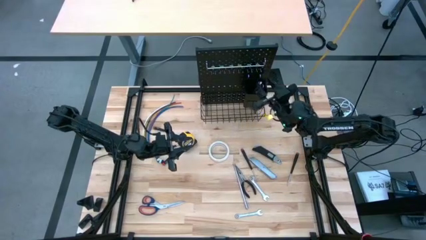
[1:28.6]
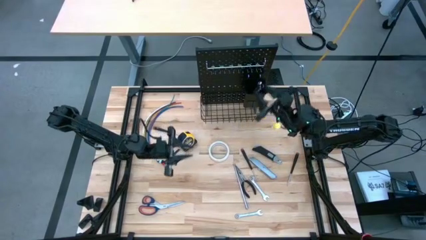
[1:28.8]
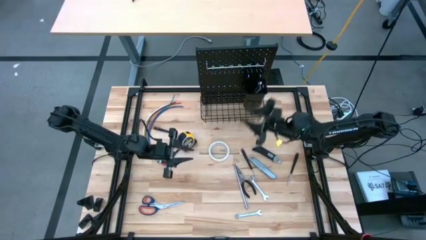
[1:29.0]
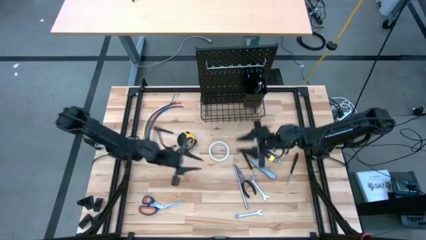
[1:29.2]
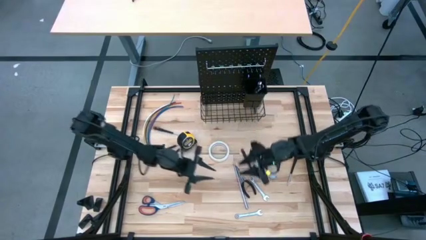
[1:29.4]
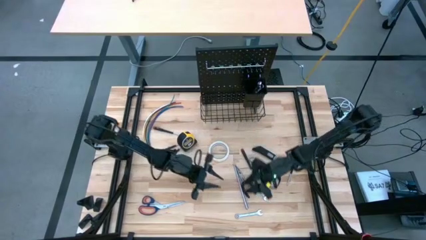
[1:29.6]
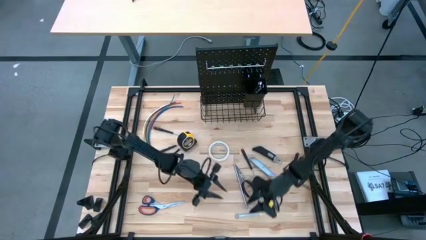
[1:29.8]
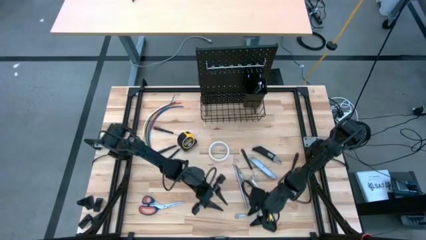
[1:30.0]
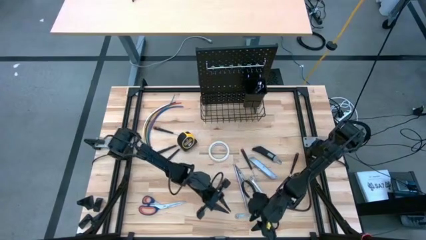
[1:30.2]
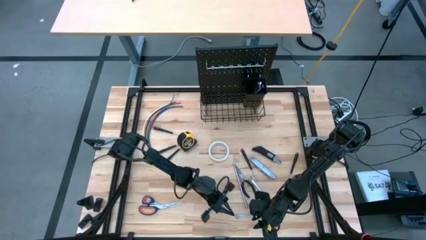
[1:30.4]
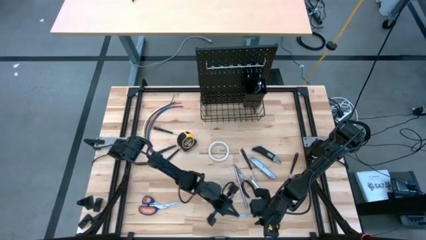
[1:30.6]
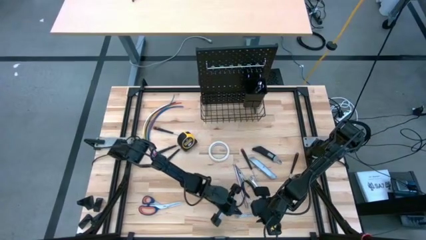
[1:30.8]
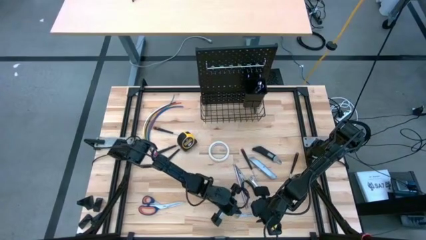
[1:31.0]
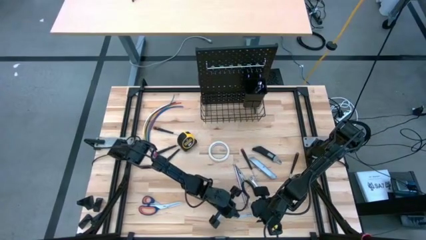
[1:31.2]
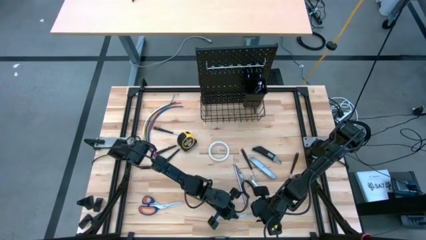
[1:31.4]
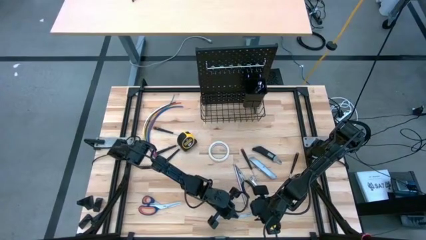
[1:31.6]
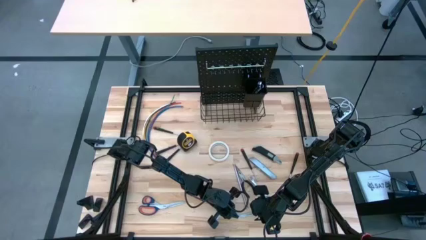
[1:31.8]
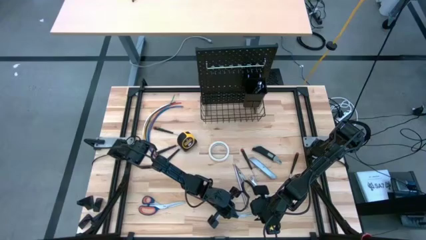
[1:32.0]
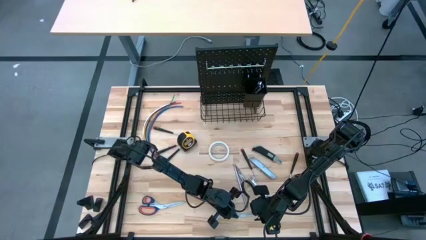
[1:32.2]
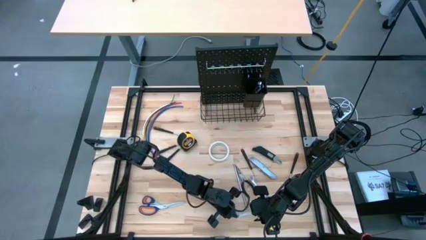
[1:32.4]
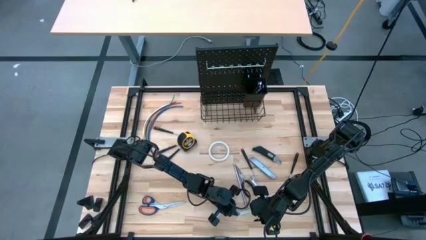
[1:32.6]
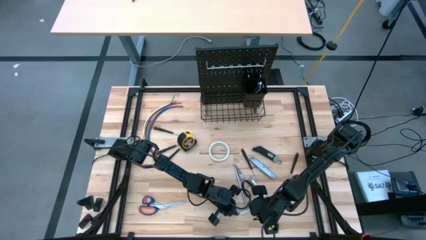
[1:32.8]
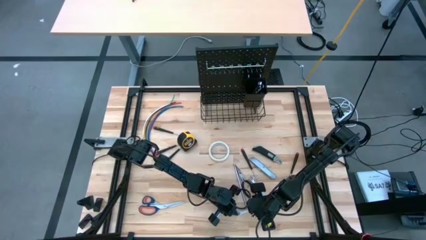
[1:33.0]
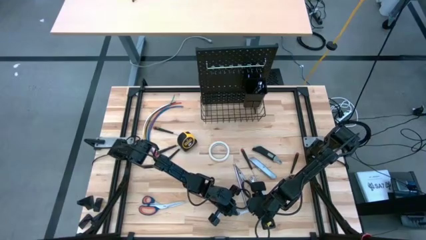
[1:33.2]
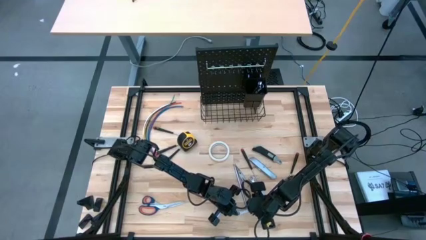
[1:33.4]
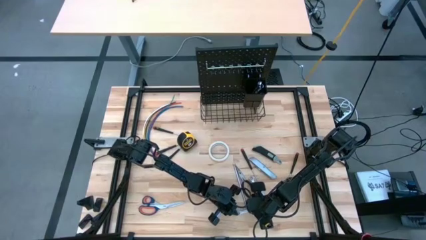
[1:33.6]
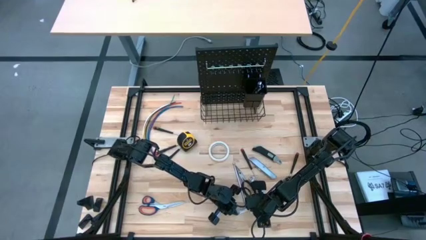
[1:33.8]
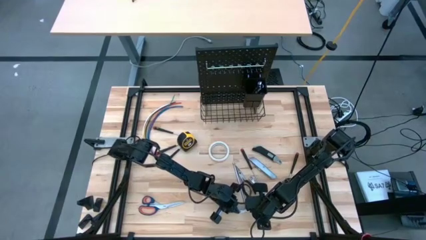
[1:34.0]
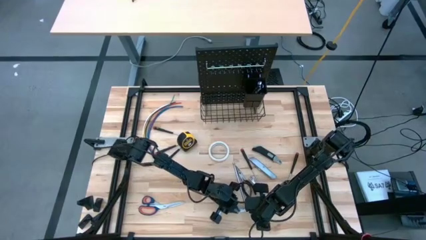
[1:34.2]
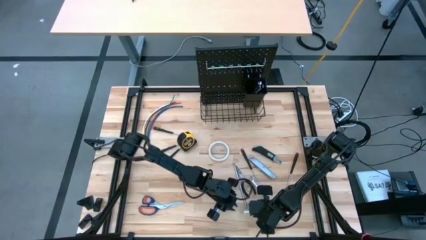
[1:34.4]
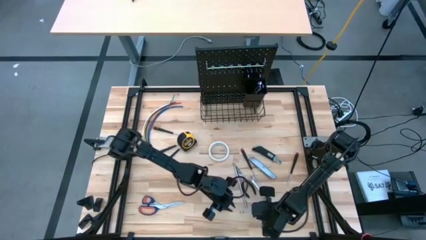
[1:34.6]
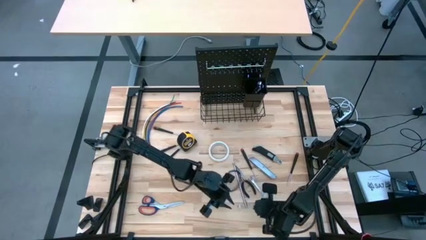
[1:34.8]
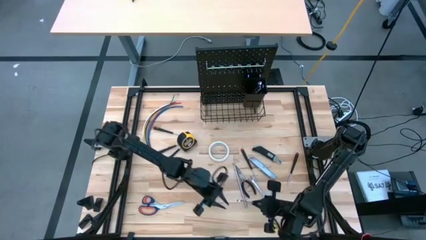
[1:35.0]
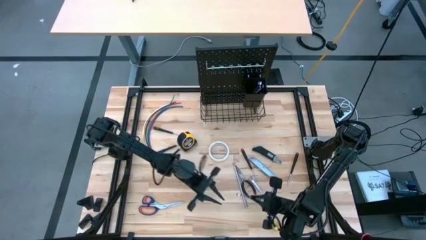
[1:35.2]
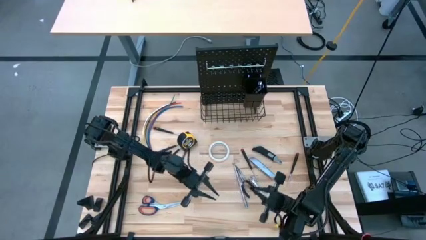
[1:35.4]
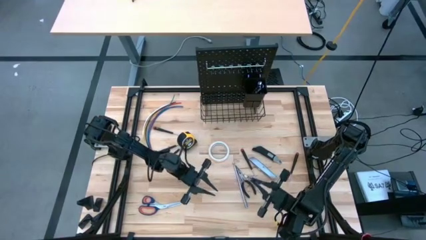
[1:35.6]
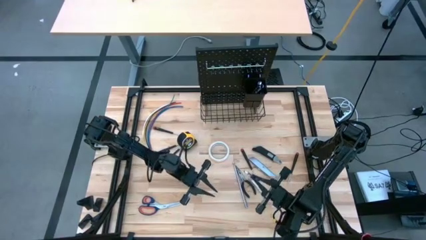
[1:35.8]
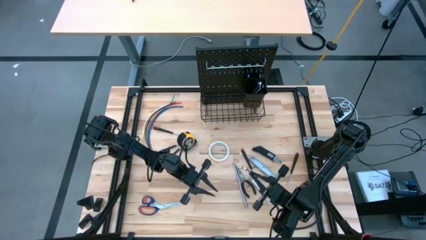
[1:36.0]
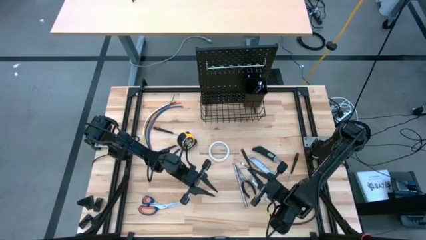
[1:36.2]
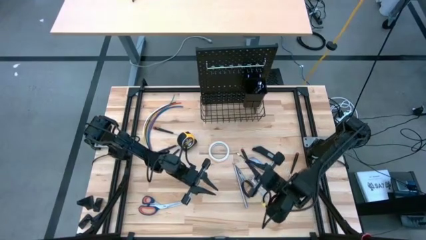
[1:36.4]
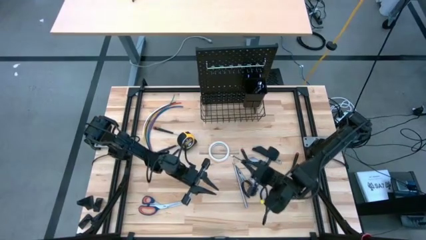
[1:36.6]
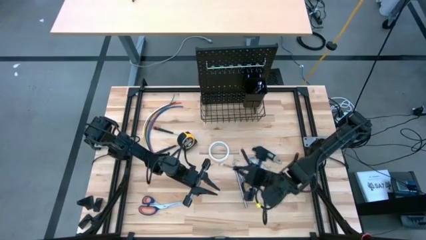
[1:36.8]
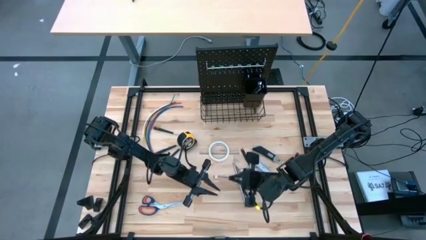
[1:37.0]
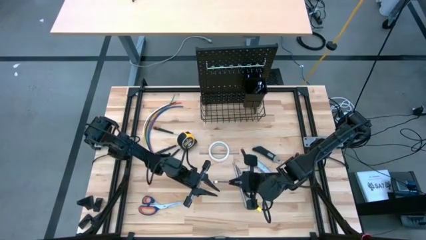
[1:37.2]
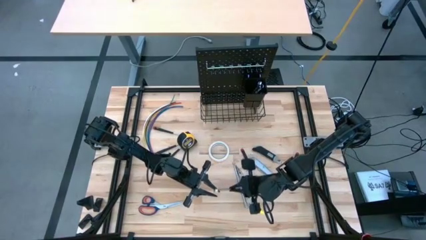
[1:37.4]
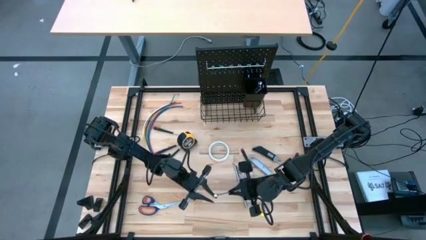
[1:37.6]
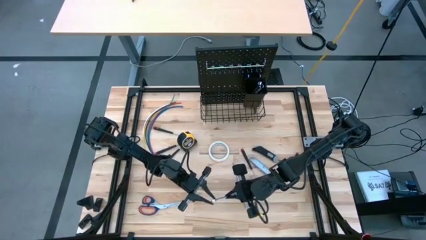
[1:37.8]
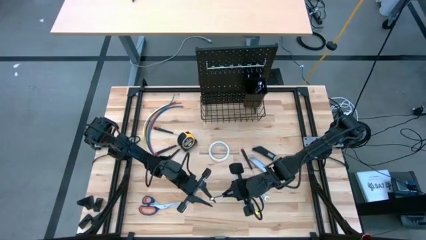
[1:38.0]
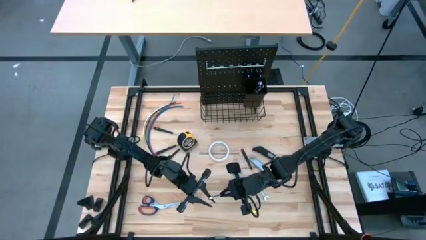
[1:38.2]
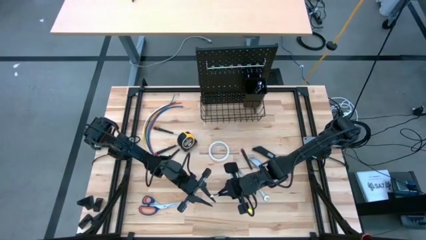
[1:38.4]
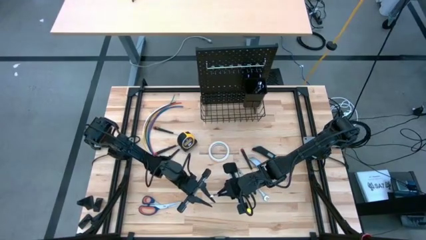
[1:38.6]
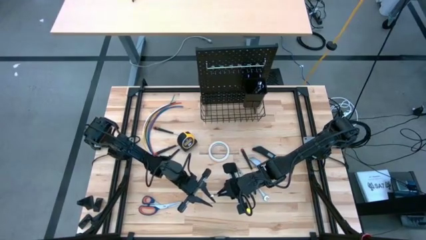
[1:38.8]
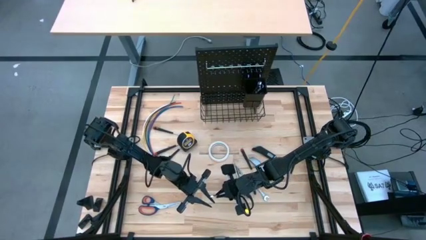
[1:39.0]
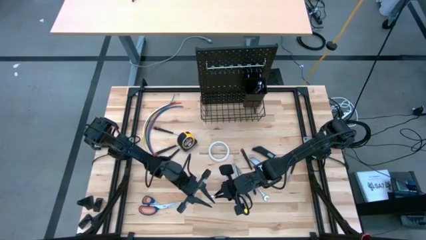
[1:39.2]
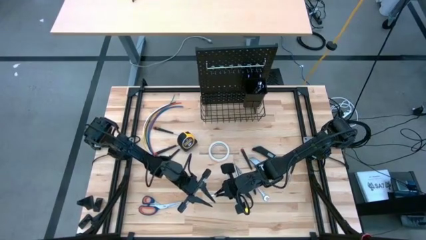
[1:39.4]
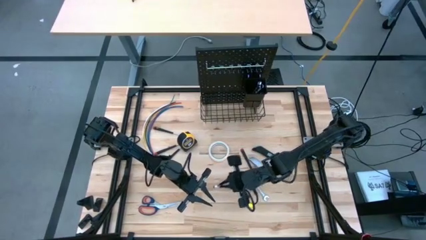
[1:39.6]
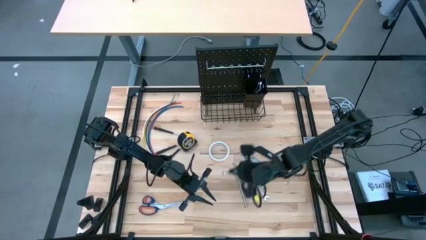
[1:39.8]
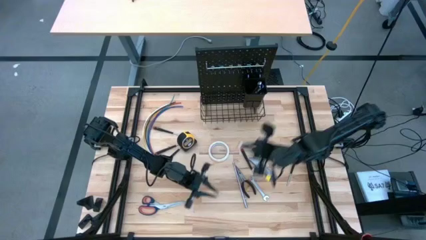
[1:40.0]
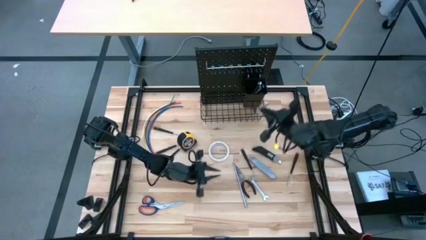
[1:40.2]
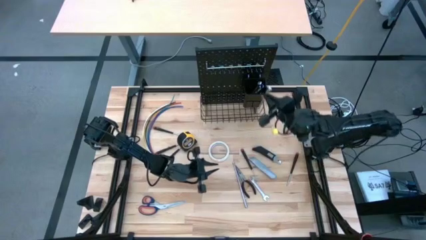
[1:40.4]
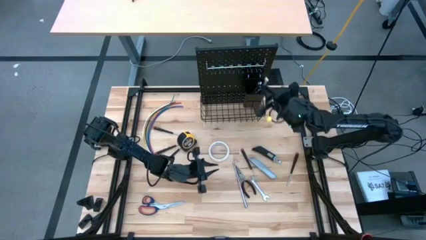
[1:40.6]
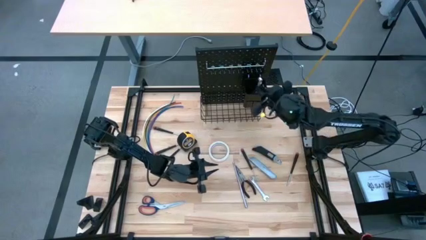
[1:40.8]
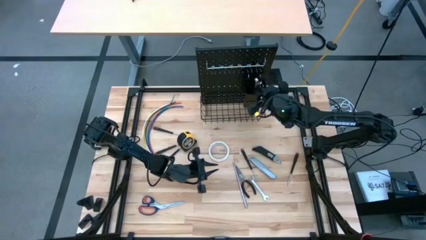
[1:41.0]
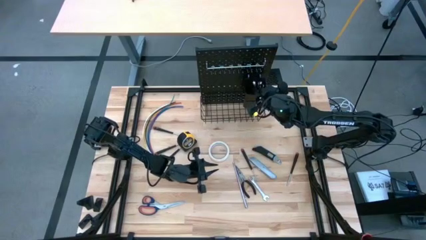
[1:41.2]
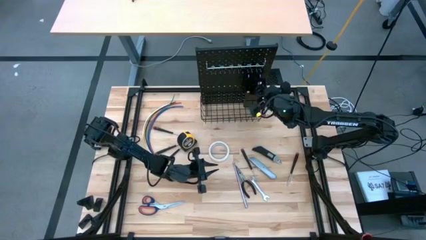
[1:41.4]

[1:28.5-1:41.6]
Task: Hang tools onto peg board
Put the wrench into the black bin on the peg board

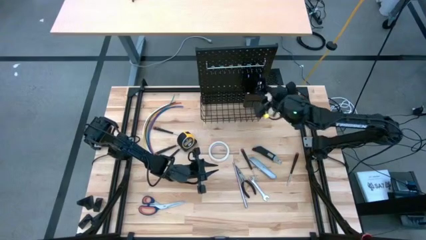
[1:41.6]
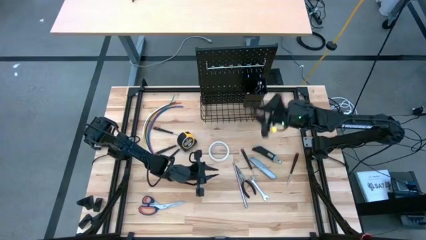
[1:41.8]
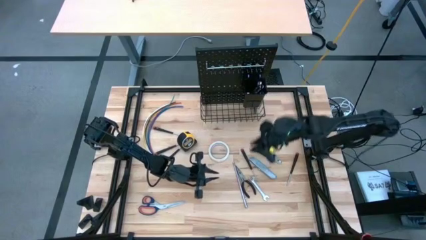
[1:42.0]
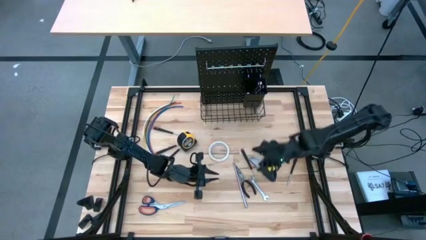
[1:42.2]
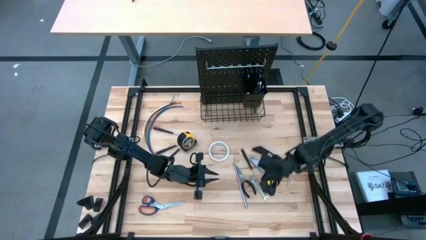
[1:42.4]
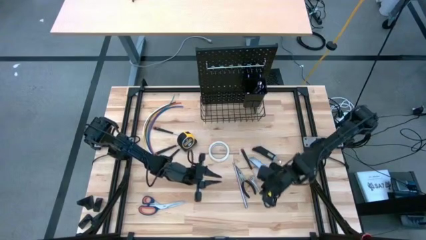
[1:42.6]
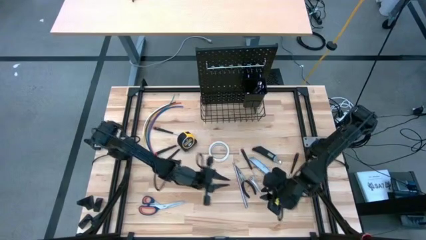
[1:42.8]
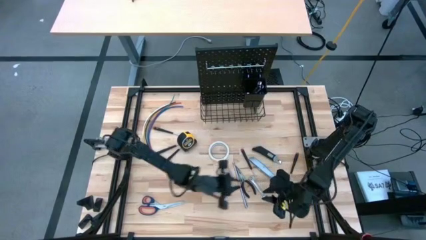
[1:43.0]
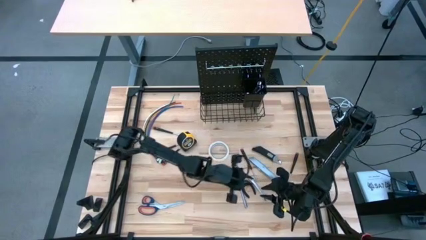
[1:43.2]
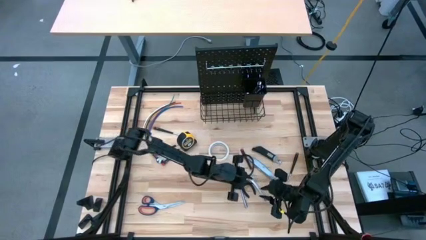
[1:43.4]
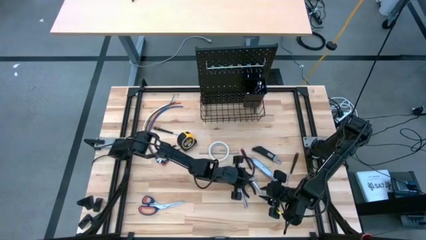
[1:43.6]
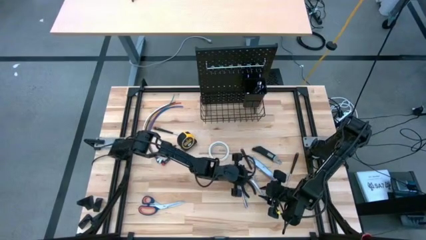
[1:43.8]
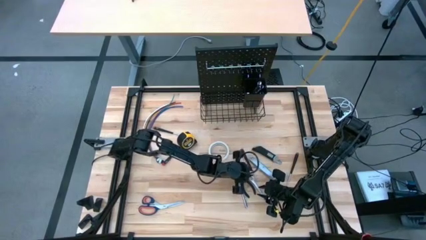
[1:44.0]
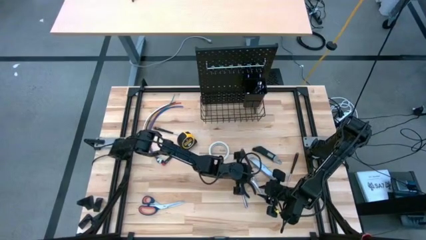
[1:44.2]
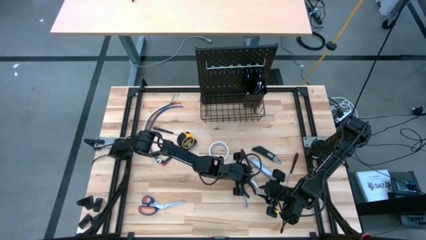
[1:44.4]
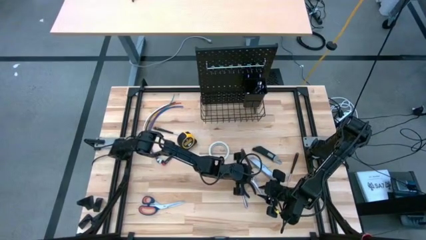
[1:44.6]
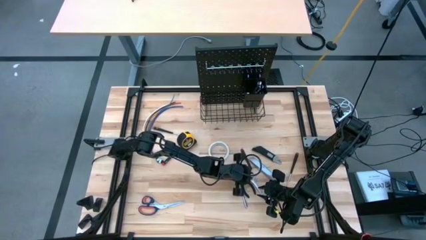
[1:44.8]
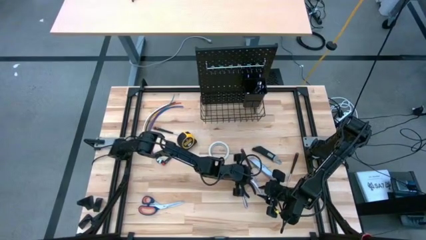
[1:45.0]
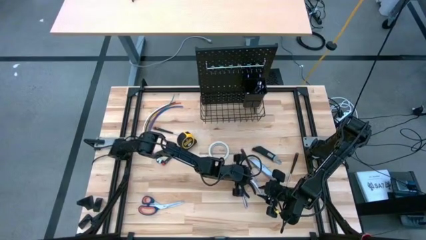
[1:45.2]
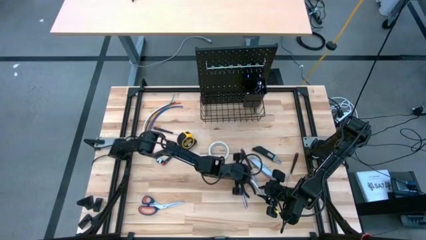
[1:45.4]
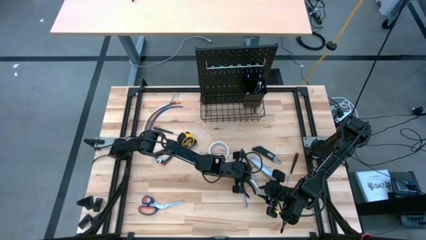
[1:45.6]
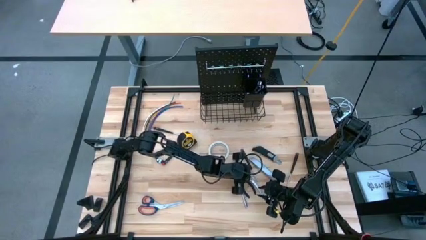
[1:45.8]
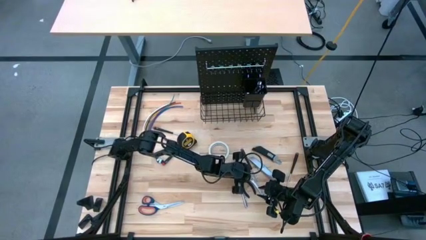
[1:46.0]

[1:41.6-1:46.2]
Put the wrench into the black bin on the peg board
